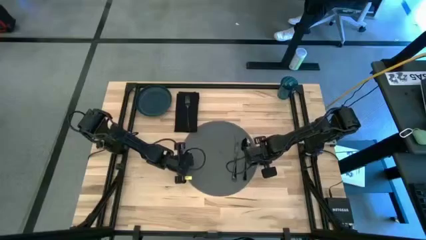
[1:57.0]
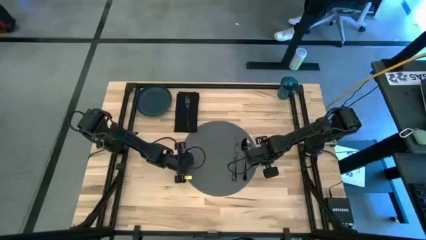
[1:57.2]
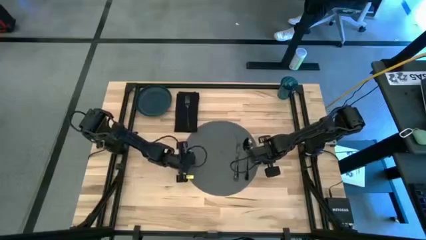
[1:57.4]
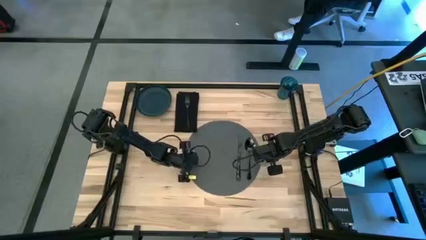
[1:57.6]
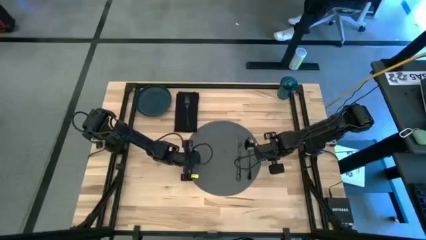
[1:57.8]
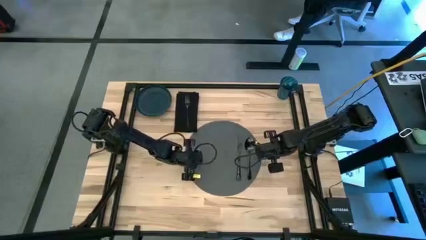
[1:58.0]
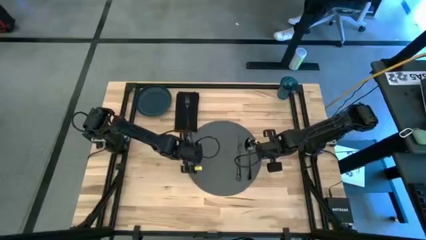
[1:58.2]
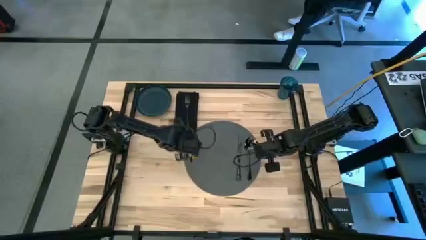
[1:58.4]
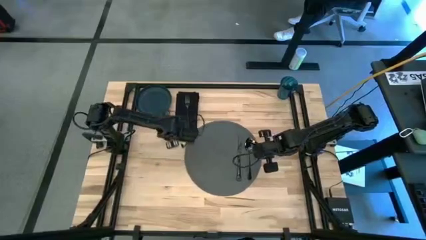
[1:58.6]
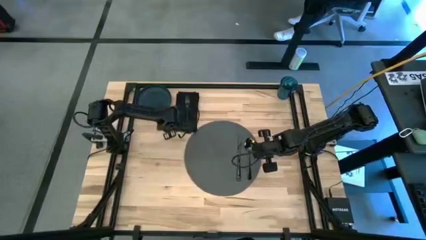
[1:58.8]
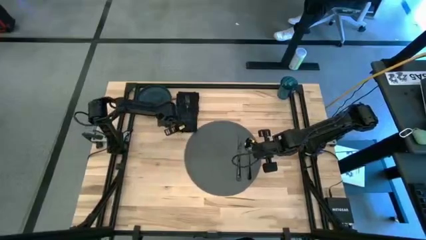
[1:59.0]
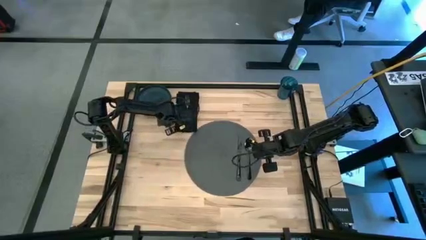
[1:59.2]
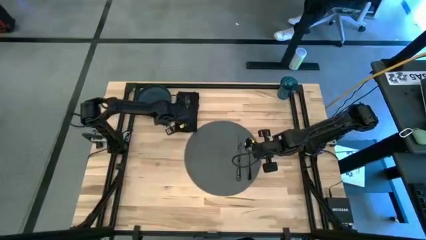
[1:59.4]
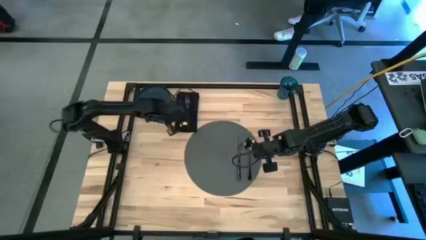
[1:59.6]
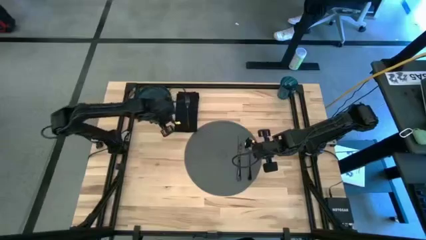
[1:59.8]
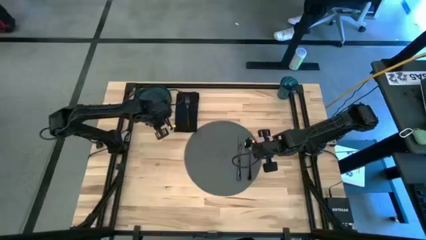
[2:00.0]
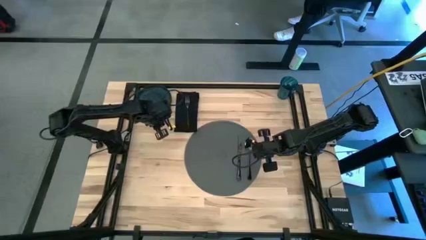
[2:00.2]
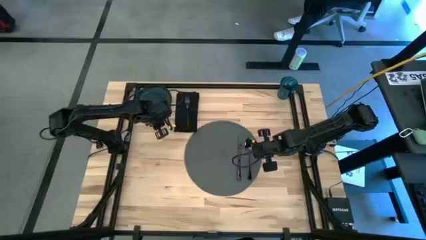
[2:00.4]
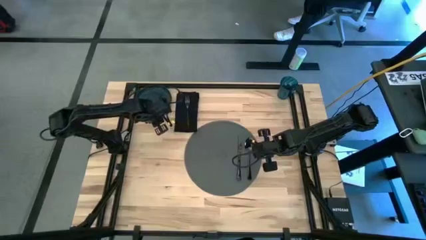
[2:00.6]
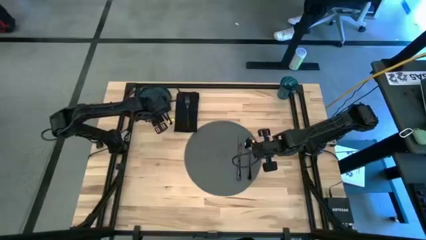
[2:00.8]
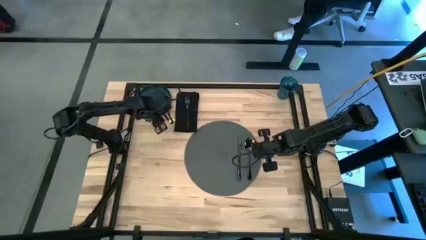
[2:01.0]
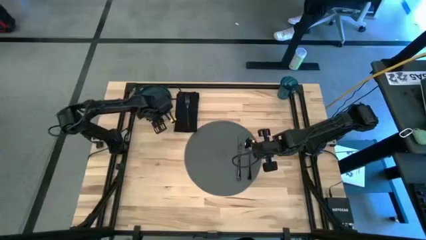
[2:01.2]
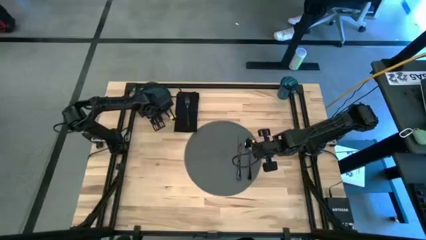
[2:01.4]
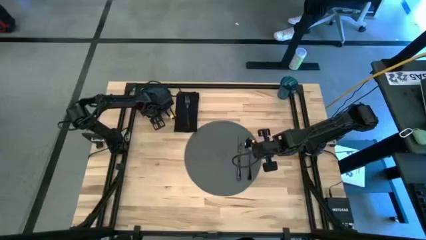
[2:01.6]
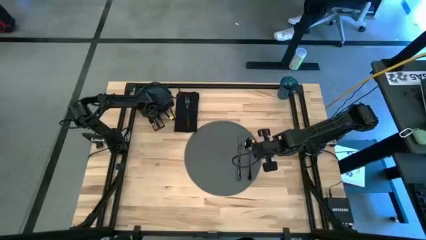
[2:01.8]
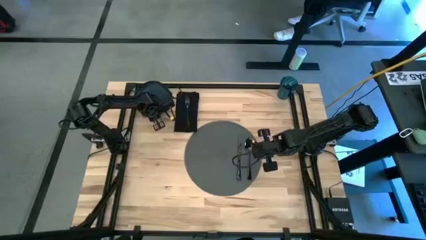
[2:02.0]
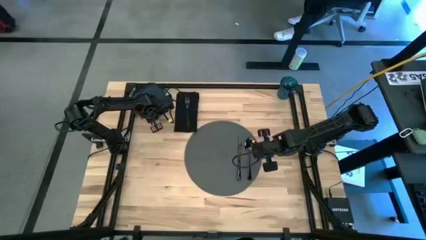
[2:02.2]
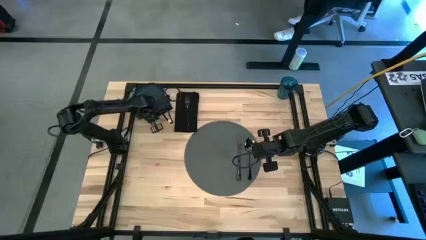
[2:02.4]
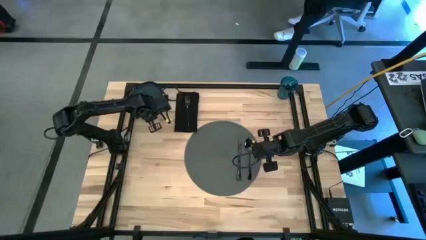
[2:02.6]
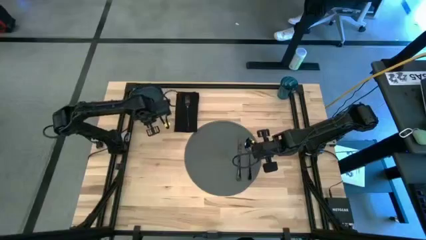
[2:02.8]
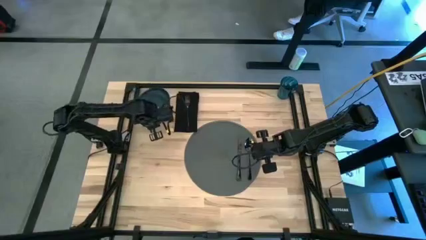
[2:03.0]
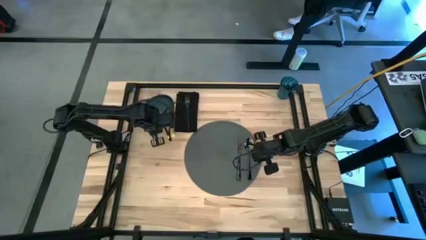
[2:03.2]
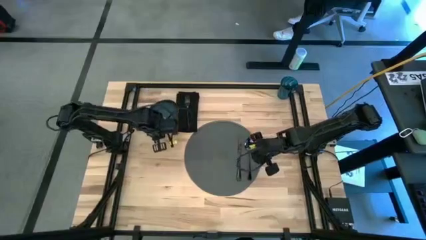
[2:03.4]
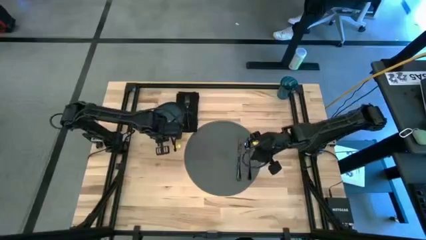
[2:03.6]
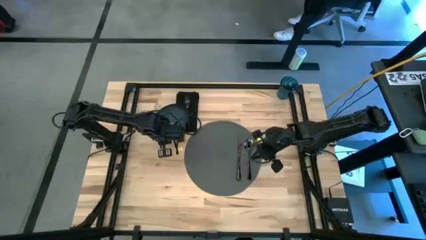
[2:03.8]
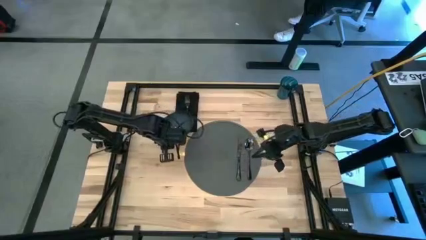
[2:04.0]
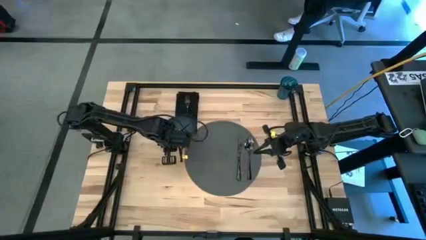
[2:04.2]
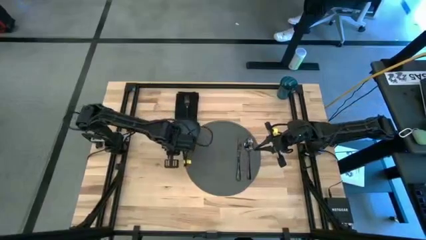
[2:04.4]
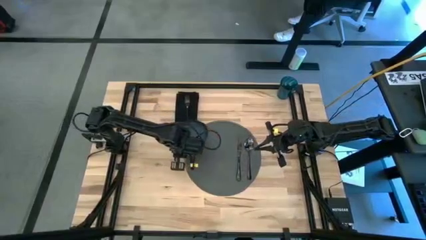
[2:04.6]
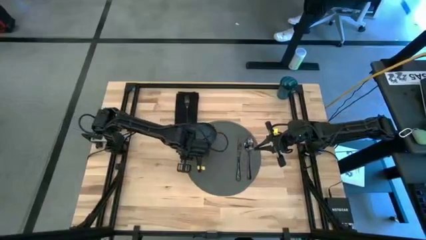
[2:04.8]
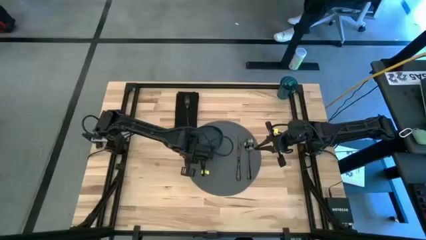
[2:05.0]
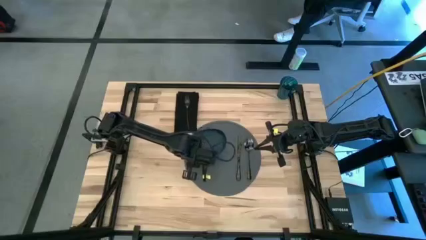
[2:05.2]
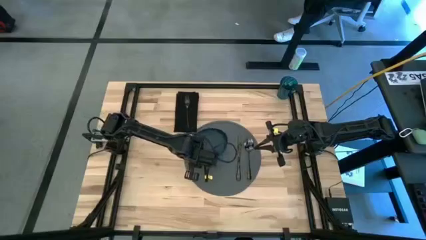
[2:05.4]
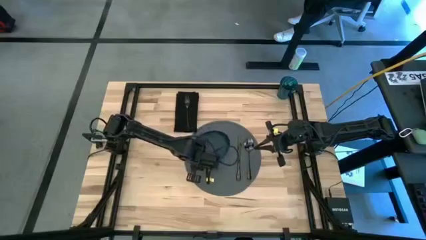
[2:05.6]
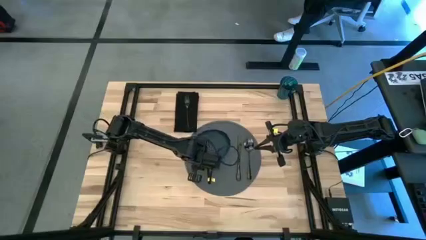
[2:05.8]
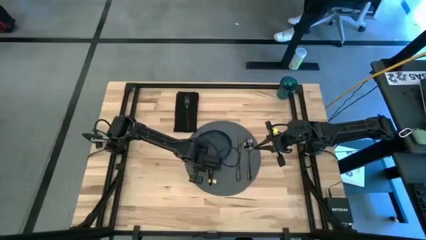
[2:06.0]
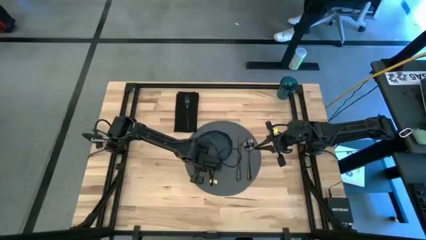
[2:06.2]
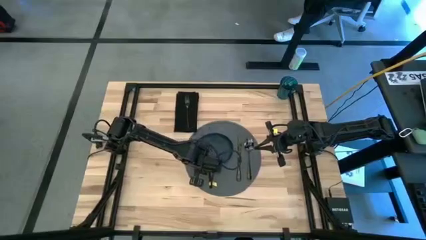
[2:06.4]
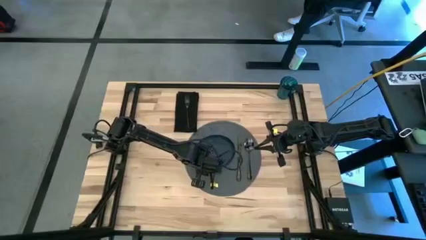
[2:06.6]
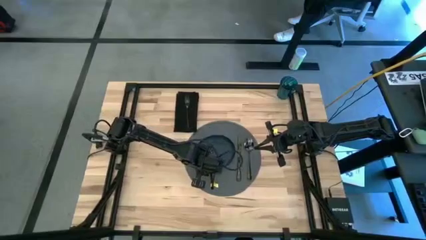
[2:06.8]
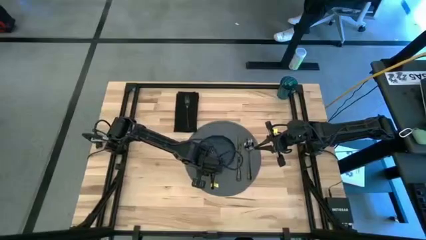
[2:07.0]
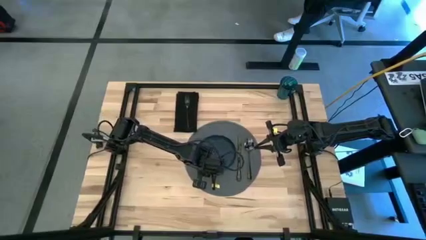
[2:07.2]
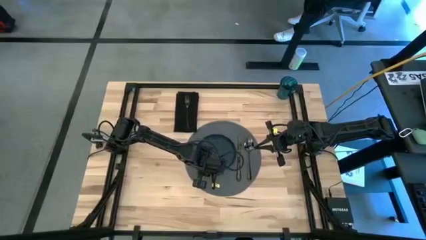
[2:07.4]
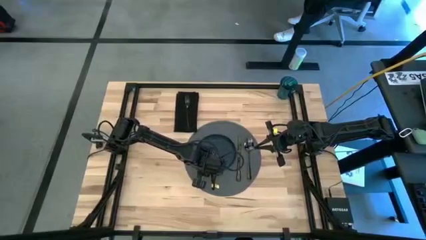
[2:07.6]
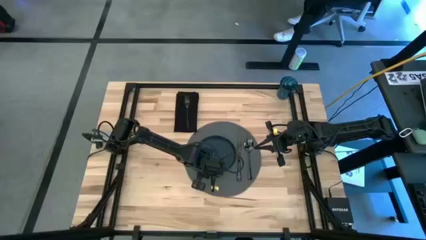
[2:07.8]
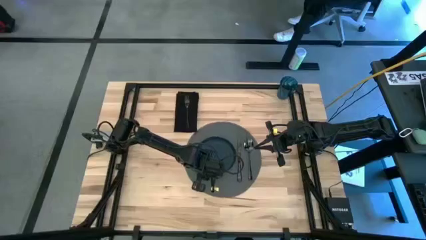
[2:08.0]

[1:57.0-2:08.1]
Task: Set table place
Put the green plate on the gray tablemat to the left of the black table knife
